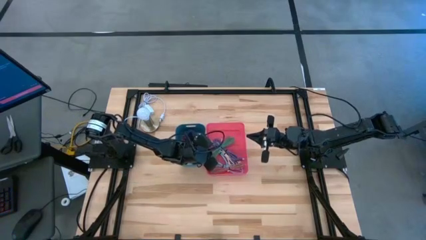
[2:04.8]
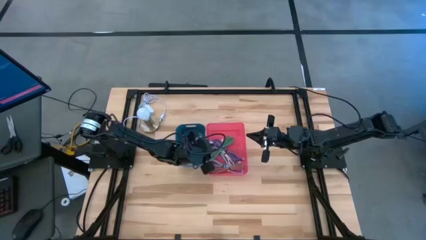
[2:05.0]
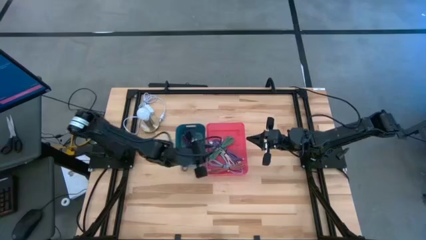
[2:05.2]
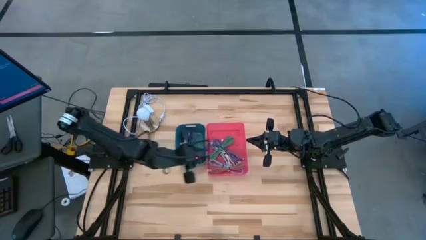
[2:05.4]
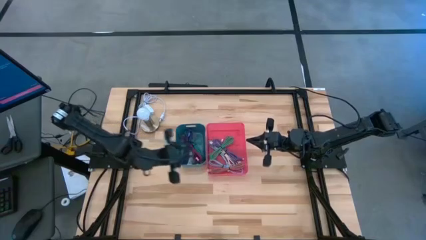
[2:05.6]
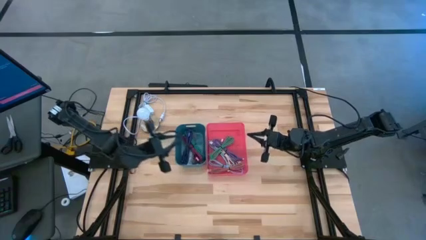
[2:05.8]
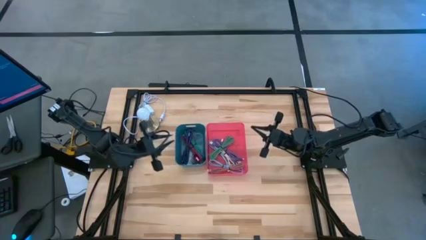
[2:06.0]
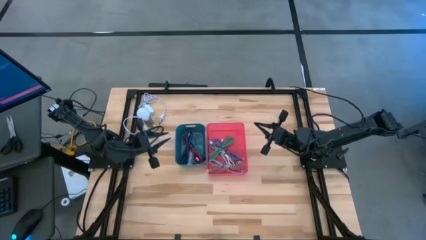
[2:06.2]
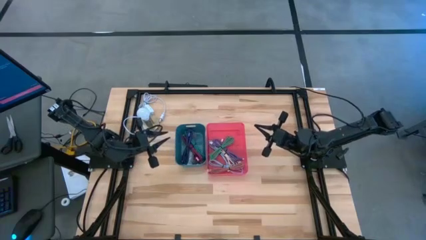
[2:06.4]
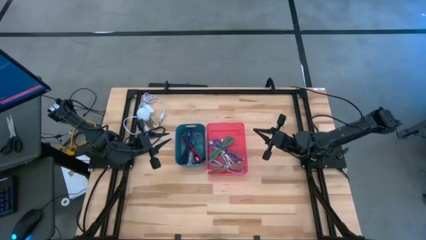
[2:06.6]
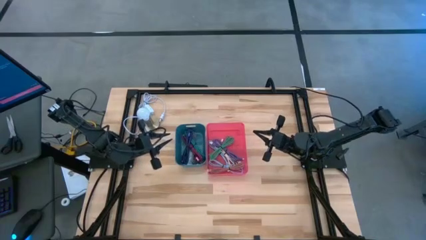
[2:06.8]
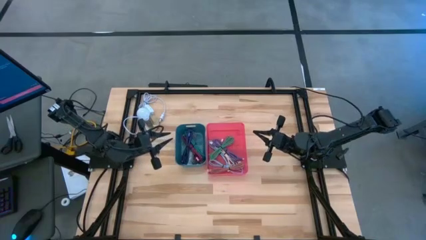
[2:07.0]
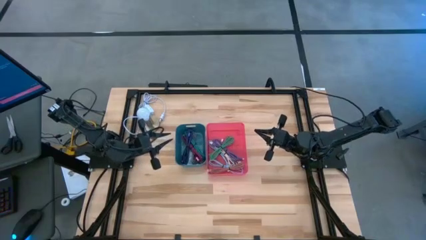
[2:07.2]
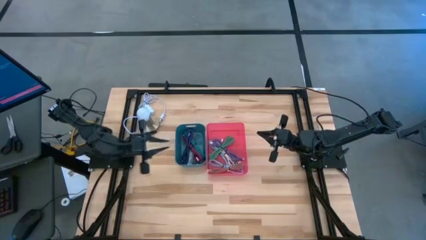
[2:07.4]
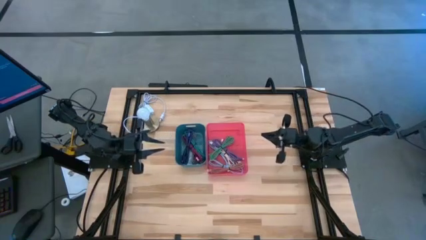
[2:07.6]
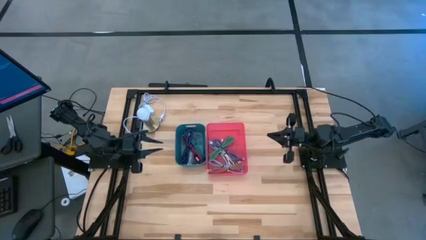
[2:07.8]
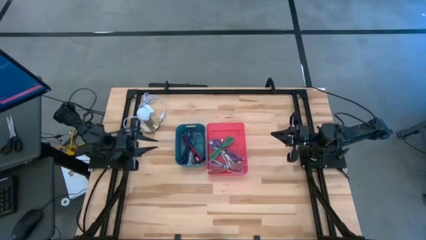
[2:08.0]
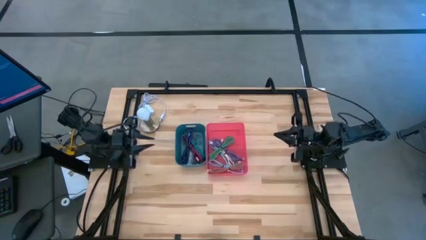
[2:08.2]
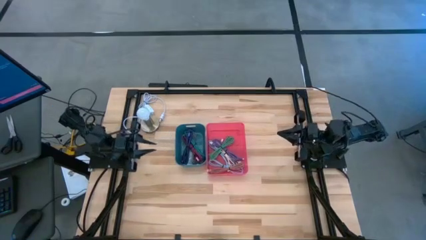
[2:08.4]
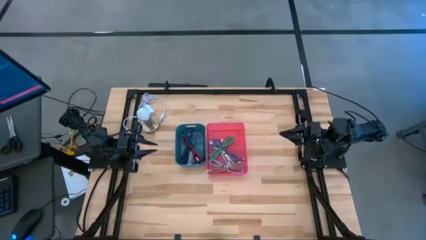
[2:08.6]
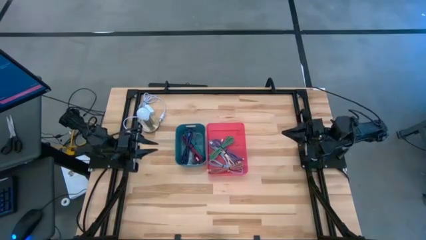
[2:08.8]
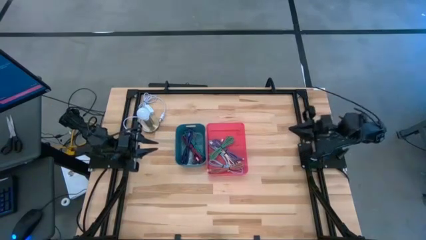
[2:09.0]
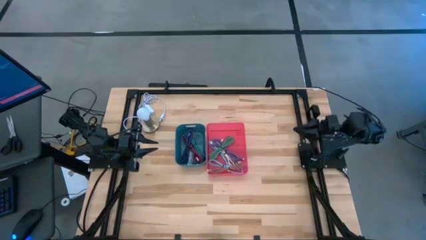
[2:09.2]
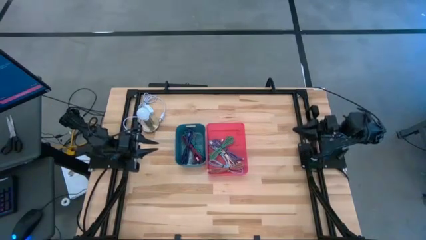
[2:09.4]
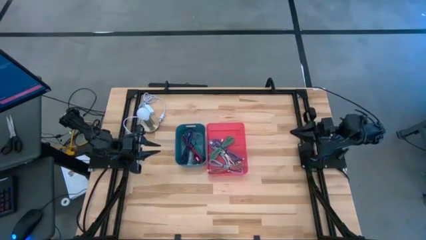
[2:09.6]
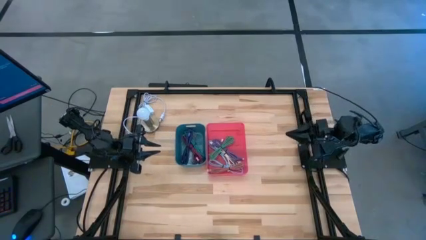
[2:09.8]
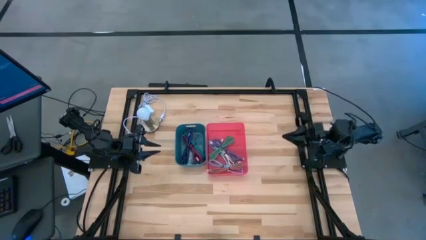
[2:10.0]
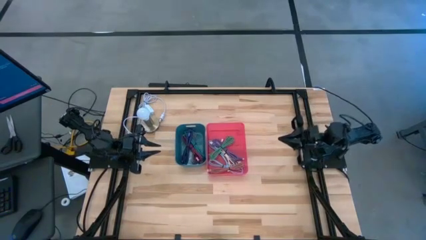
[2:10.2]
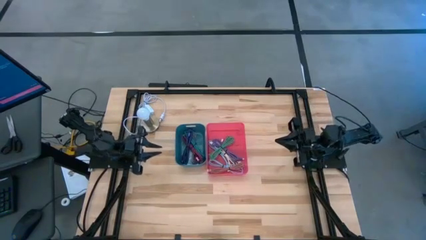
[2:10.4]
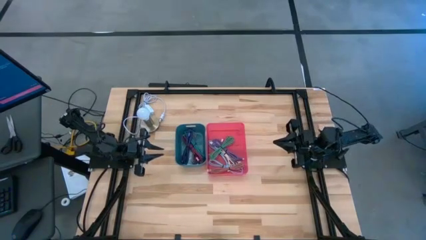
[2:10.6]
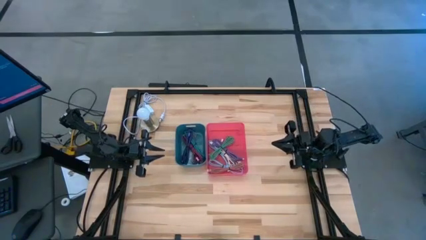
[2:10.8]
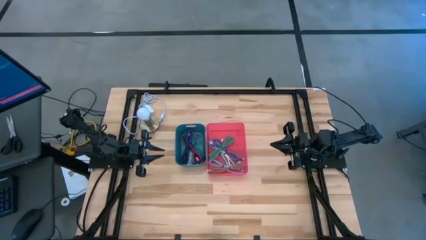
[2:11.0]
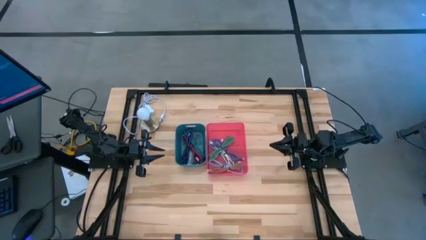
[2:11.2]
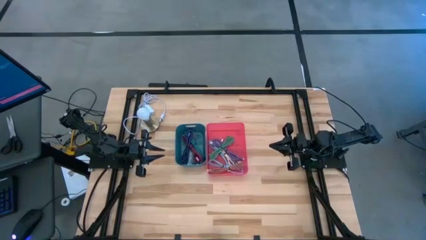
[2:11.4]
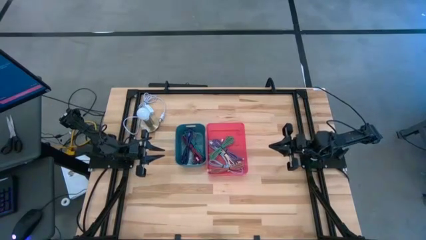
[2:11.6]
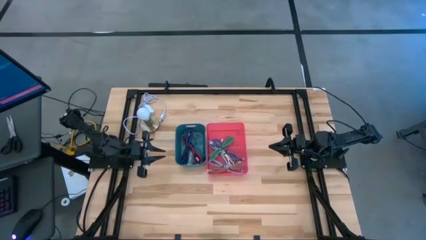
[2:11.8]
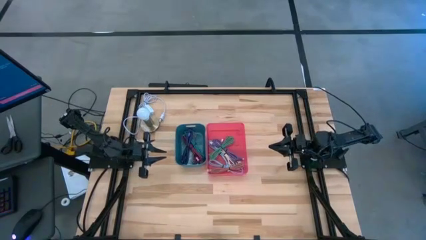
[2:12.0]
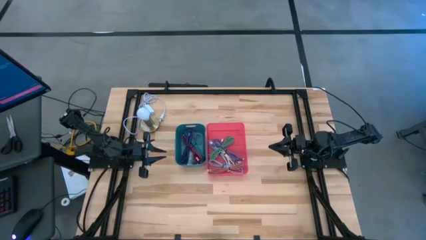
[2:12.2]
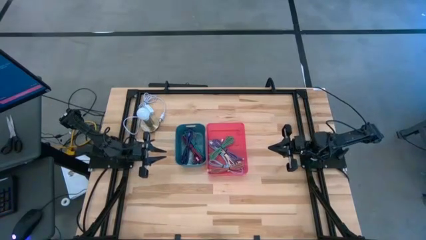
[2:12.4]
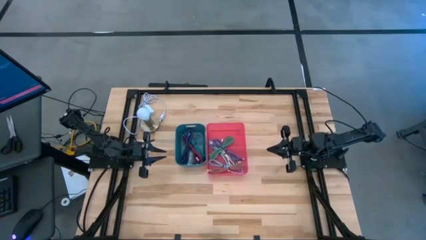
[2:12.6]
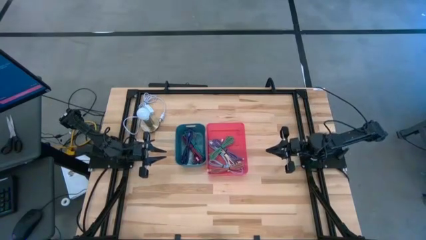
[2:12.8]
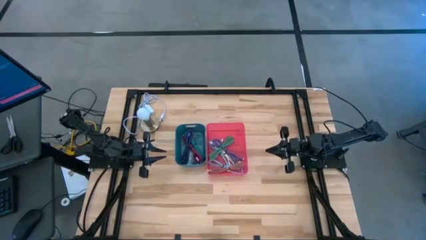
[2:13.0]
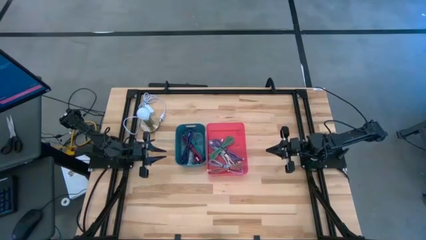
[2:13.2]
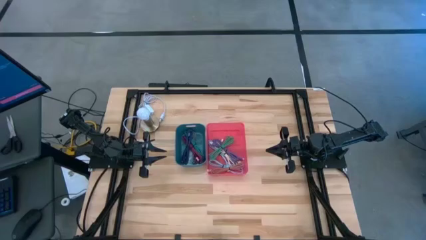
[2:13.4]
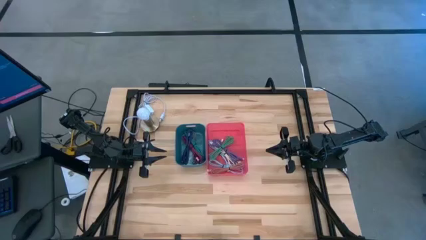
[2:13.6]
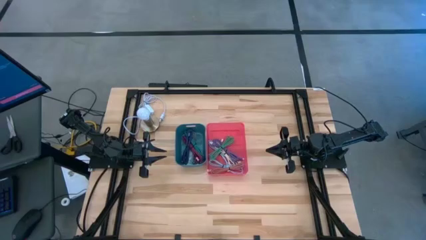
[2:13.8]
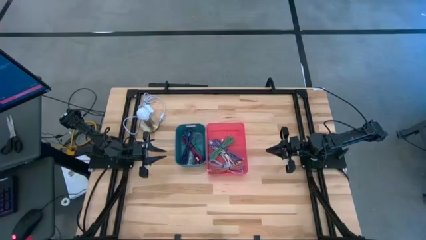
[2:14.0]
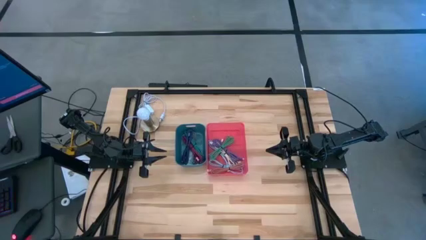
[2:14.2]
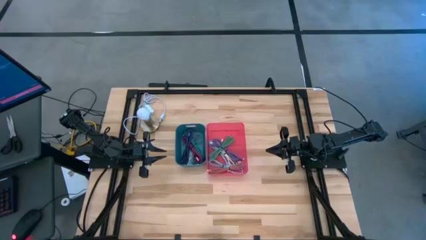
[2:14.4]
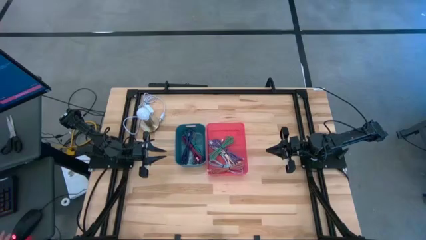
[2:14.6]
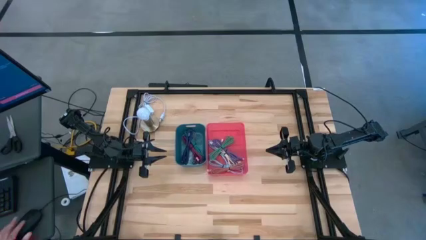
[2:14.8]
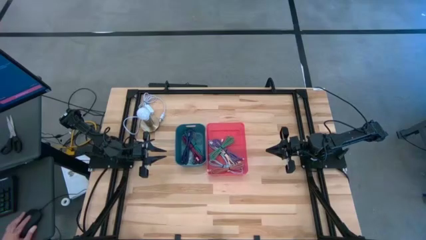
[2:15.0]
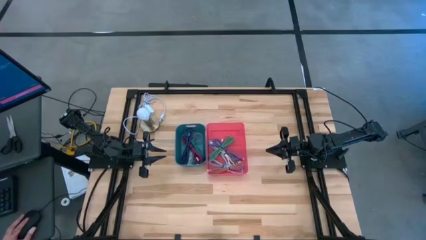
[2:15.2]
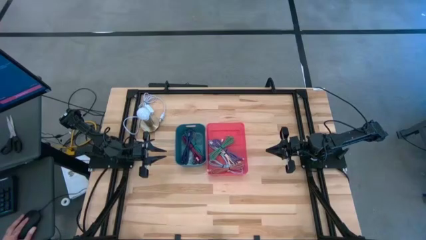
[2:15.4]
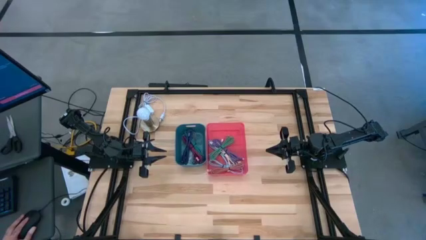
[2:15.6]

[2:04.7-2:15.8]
Task: Pick & Place USB Port
Return to Home Position

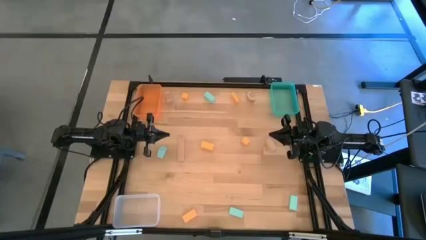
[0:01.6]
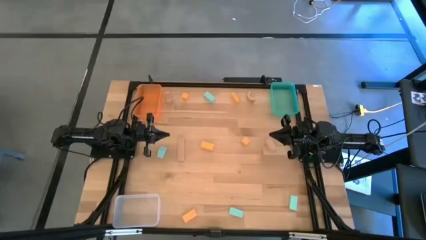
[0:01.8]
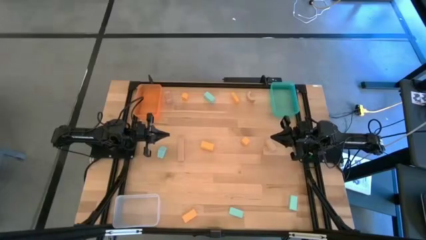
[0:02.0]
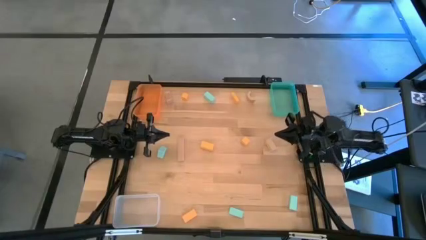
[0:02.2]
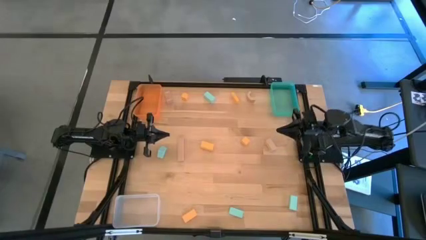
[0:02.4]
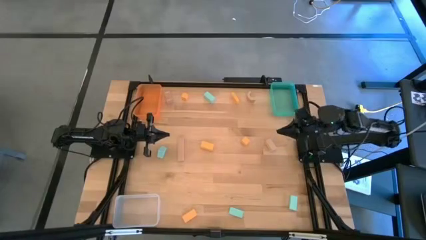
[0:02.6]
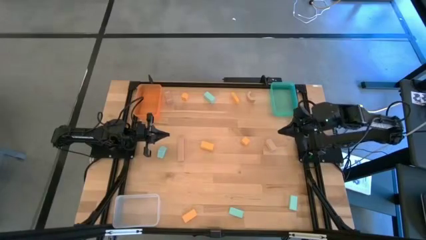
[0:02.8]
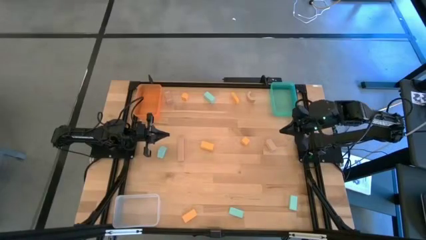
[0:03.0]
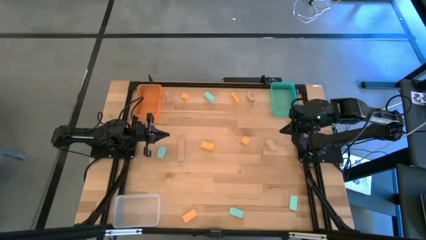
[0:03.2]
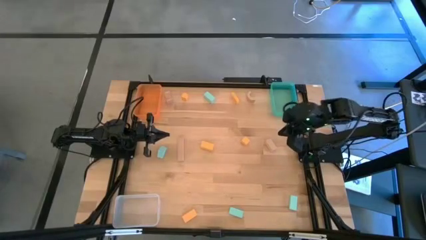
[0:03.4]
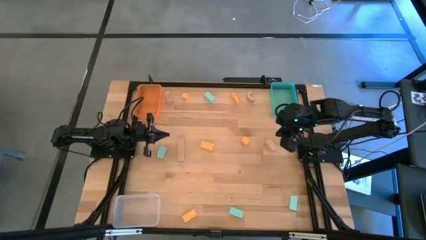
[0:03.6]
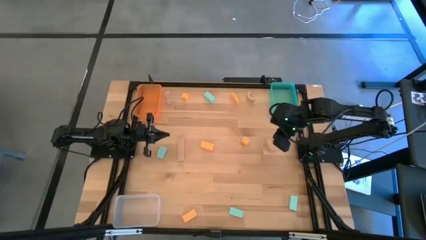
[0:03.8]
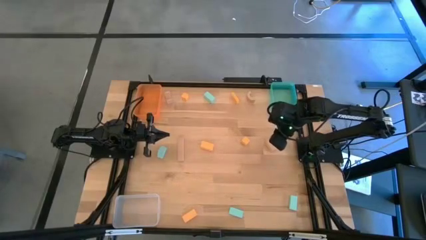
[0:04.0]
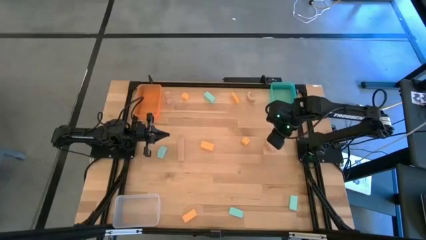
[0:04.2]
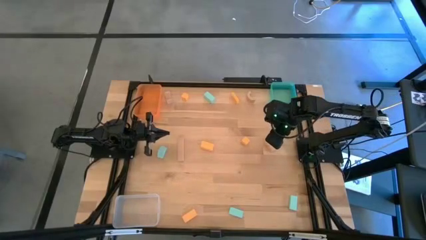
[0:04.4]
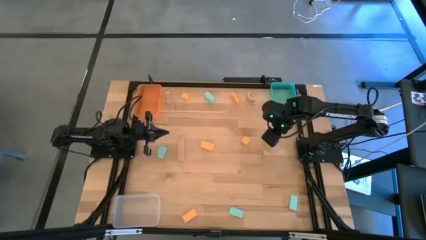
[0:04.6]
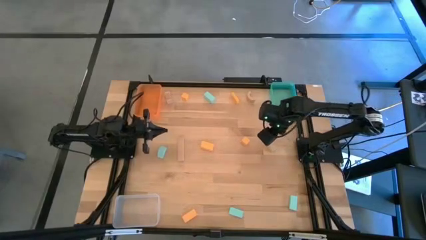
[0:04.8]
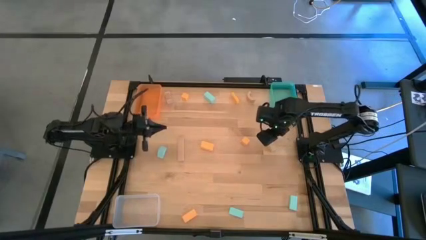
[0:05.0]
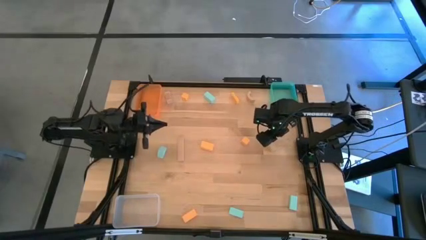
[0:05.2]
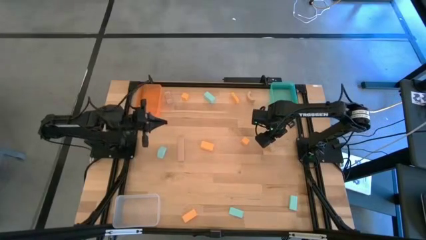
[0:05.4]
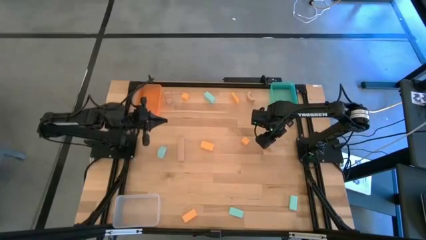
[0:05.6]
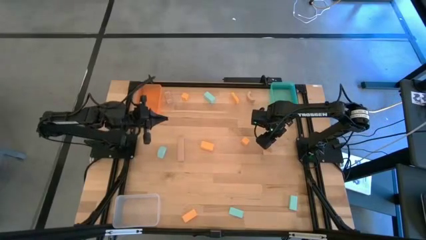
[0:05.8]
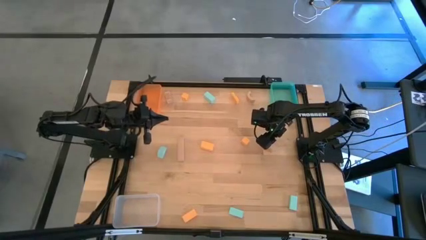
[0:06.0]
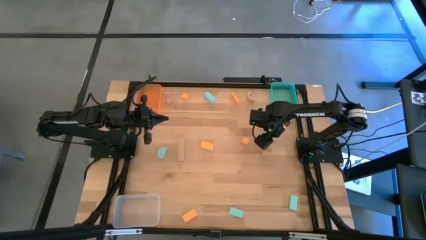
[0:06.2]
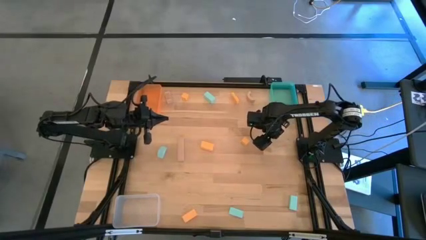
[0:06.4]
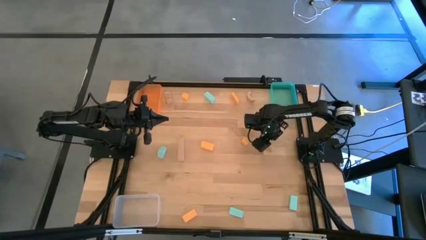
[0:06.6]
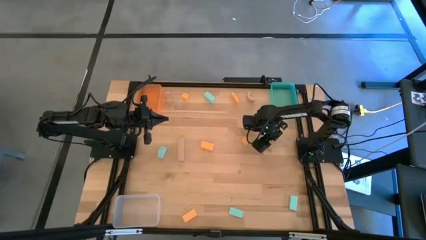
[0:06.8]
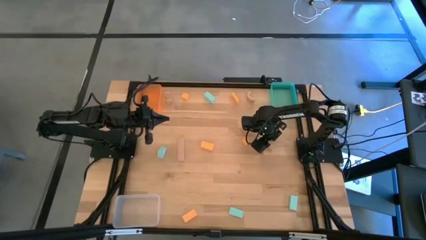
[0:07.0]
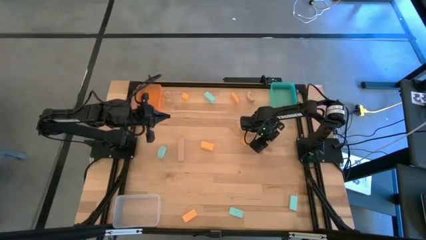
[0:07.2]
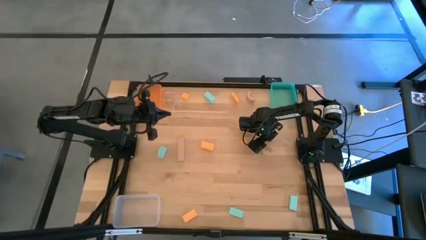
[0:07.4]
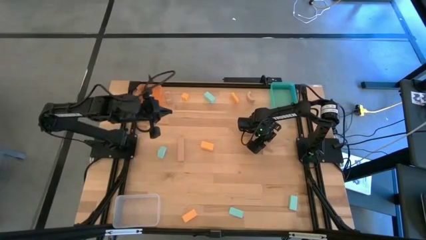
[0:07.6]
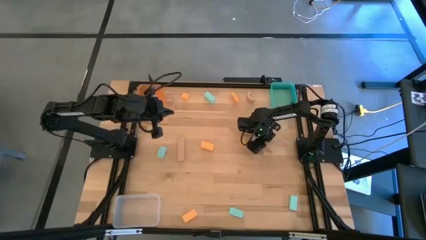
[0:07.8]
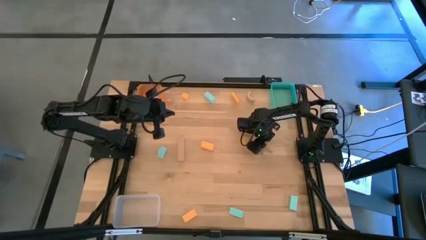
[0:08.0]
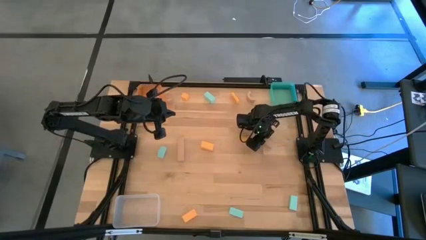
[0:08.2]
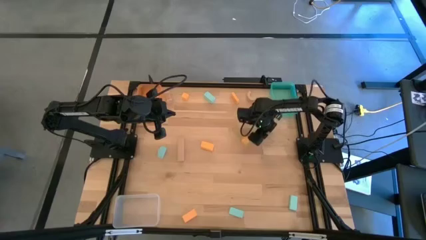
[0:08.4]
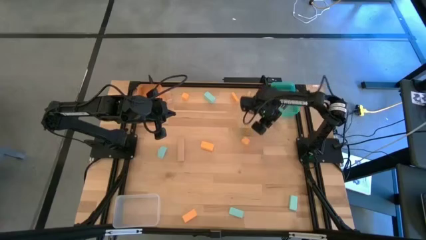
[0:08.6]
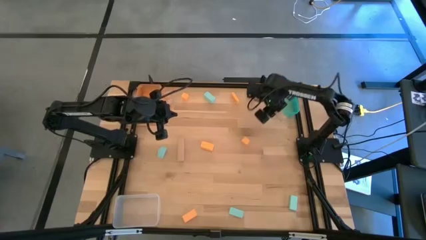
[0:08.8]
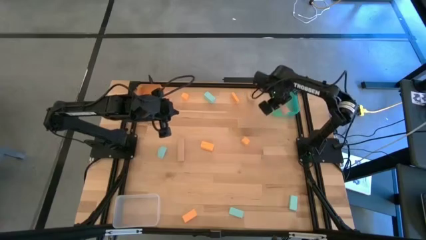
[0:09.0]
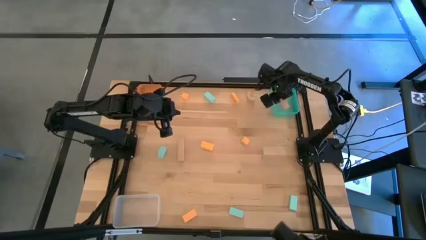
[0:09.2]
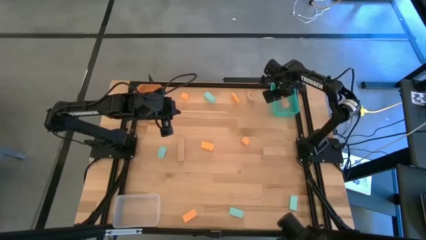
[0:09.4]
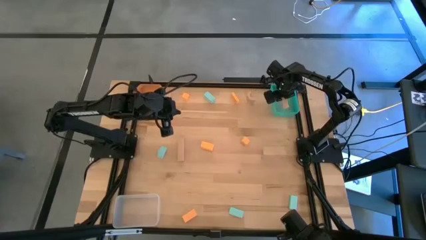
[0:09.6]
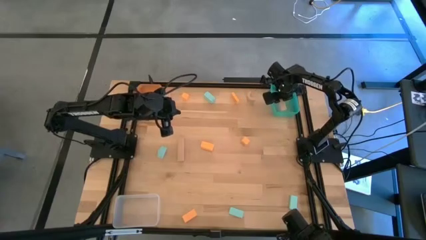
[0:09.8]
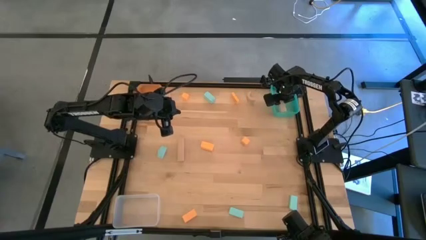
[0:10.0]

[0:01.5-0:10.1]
Task: Sort & place blocks by color
Put the brown block into the blue bin
